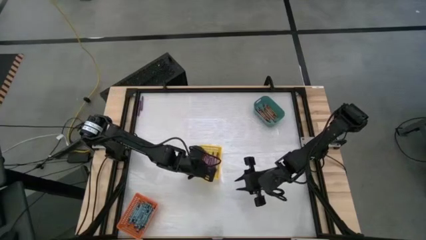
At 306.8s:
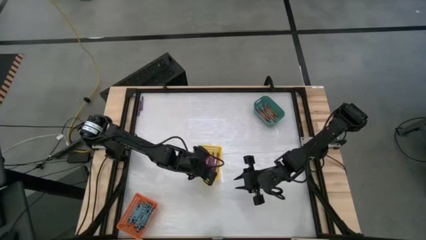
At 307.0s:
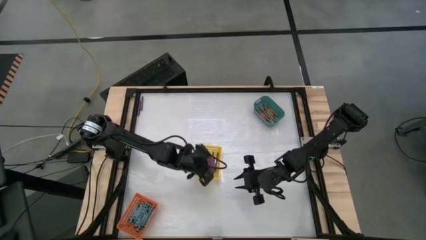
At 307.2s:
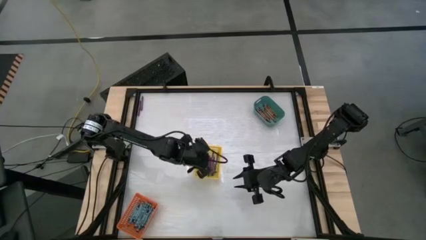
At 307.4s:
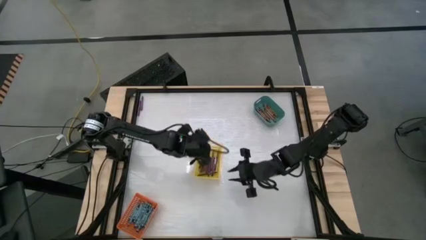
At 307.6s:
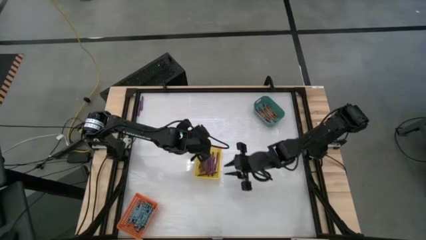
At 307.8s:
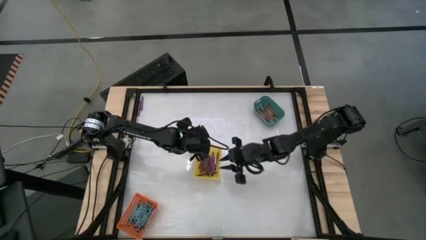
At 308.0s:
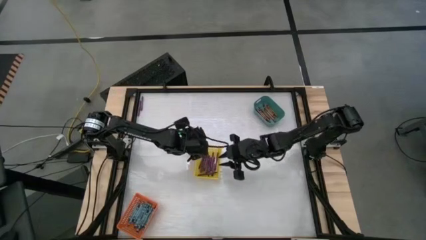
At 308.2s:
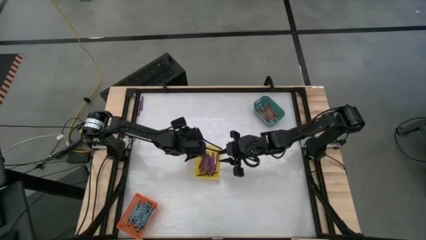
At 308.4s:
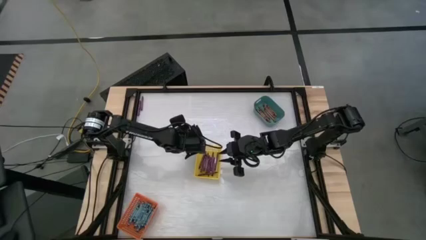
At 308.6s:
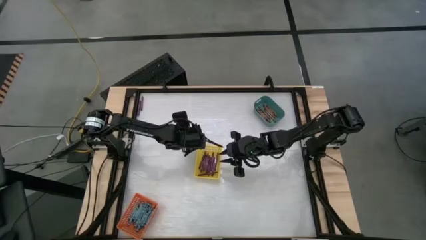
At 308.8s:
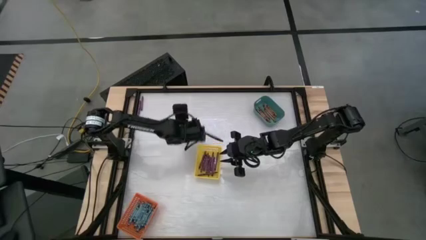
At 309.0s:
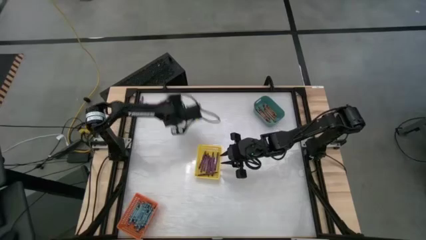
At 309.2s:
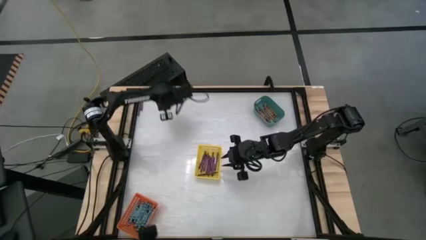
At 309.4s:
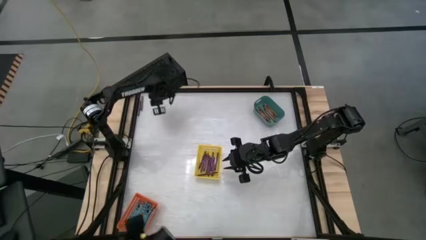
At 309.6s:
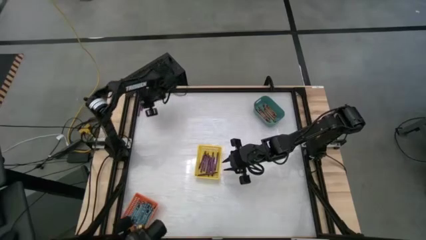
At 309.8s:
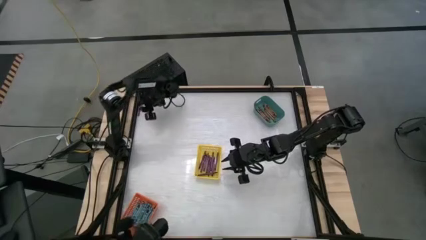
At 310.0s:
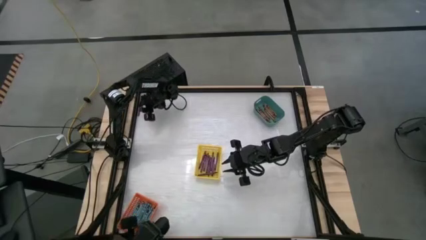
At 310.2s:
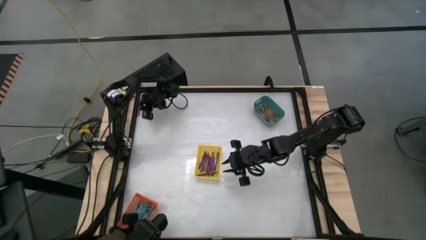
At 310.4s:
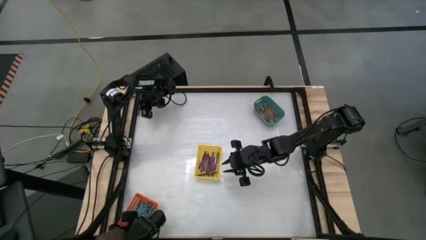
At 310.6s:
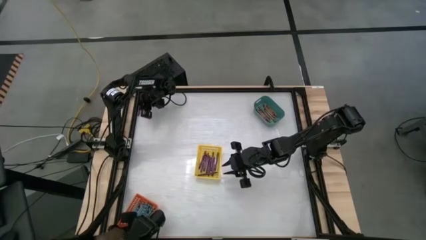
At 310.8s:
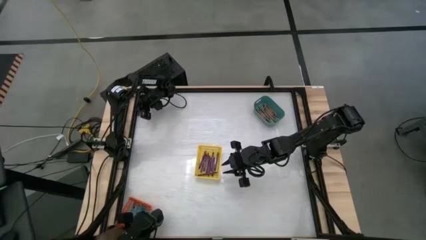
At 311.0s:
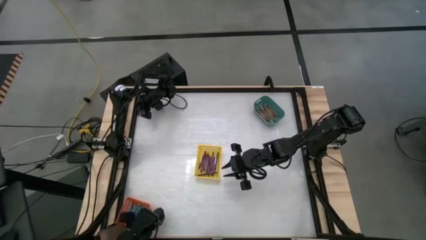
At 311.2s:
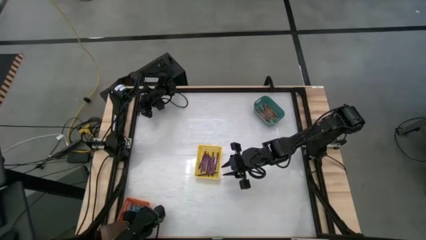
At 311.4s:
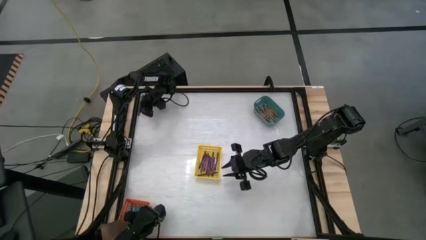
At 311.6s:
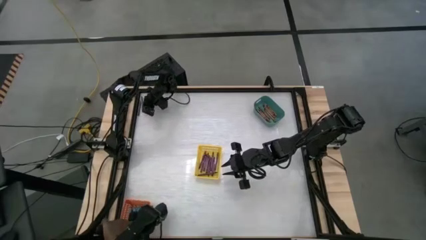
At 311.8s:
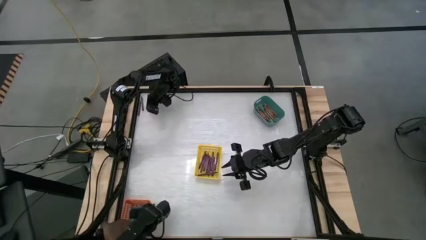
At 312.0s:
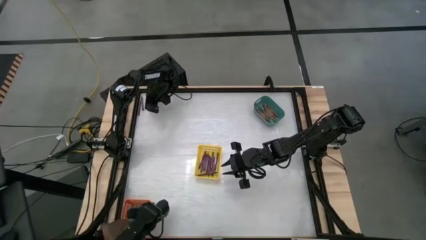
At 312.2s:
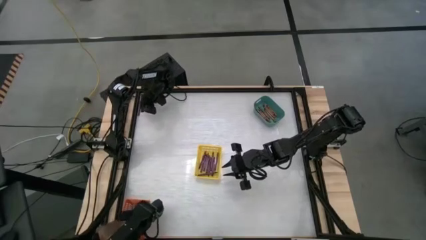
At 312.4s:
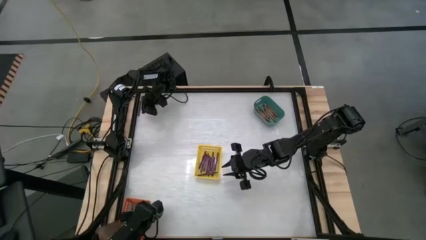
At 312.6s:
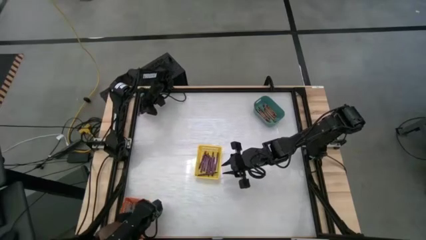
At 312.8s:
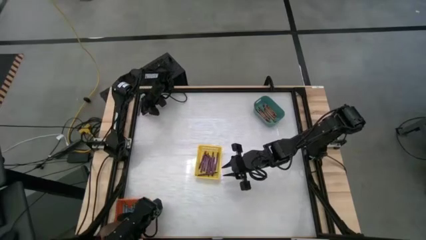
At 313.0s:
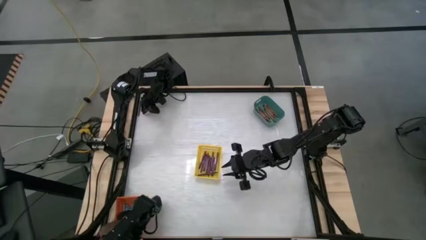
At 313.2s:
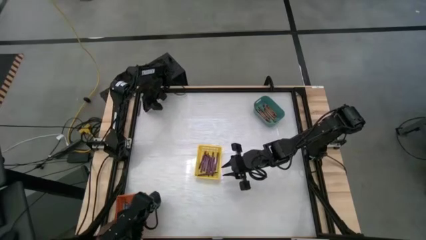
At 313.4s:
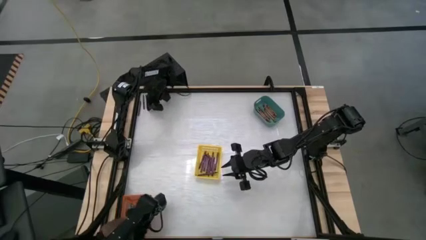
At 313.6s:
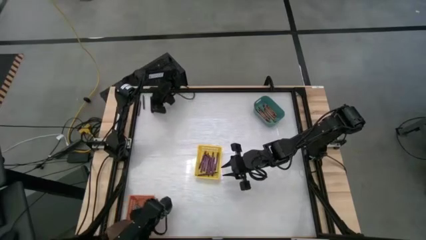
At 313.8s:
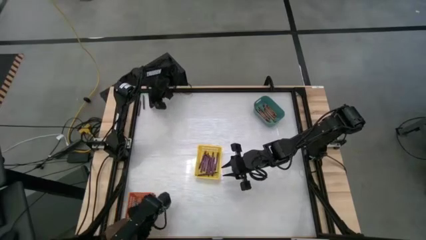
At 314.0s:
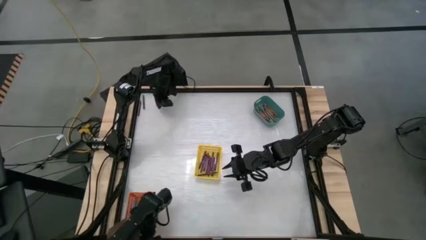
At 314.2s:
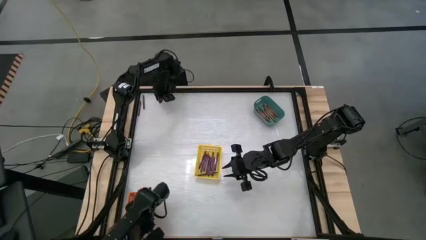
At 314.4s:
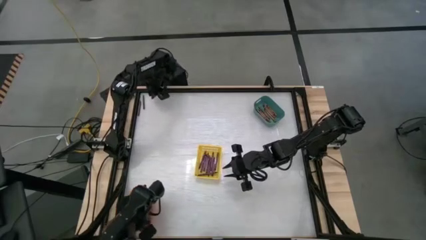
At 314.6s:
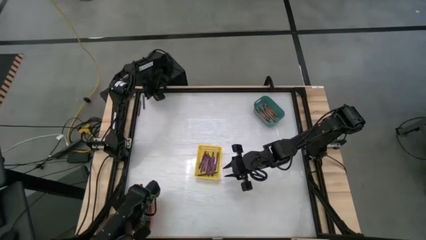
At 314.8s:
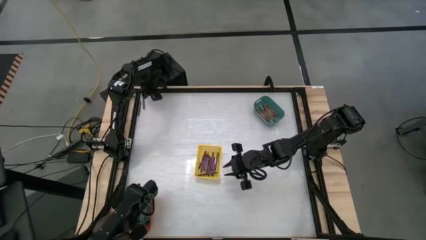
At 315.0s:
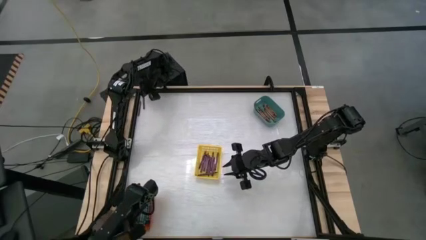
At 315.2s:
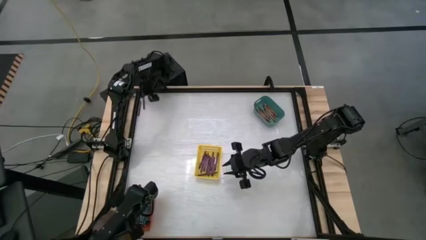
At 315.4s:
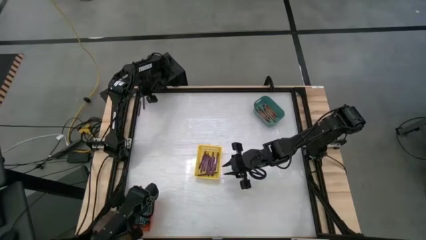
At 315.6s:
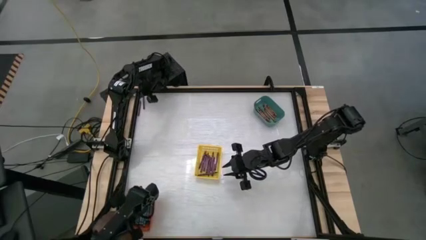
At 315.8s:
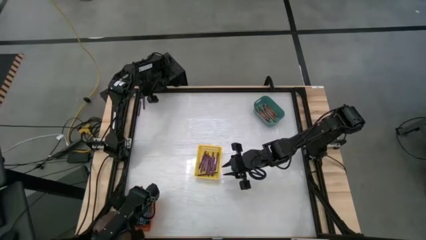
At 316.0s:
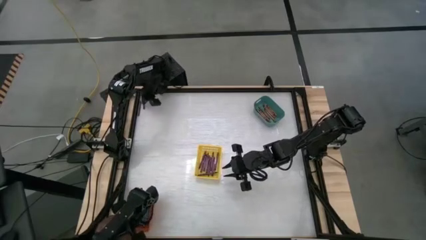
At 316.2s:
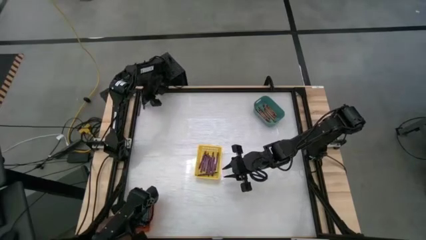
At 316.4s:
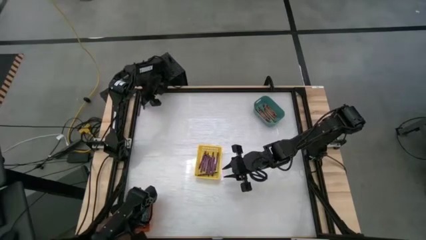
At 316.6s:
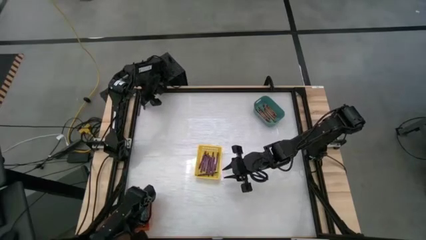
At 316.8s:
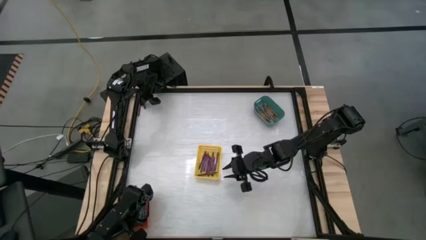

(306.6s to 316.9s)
Task: Sort crayons
Put the violet crayon into the yellow basket

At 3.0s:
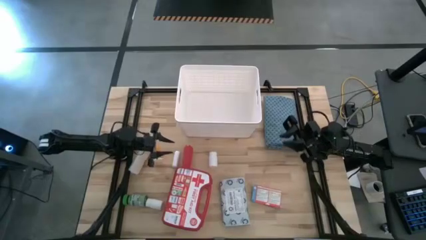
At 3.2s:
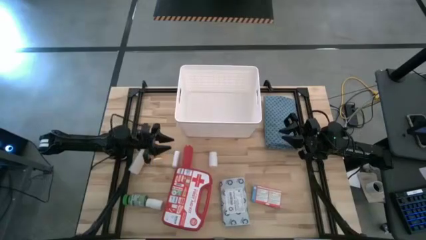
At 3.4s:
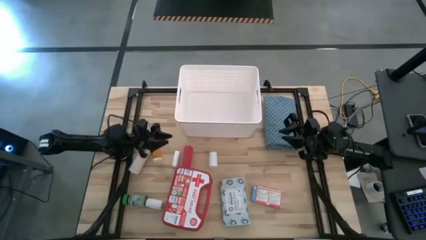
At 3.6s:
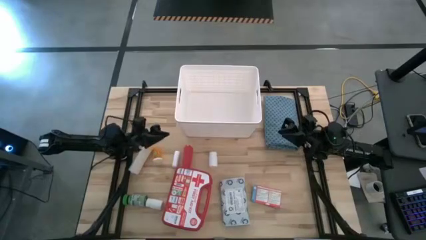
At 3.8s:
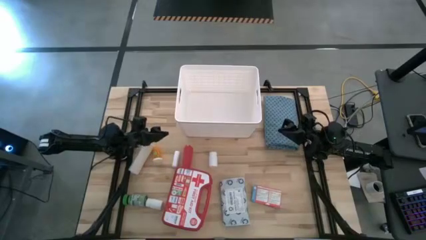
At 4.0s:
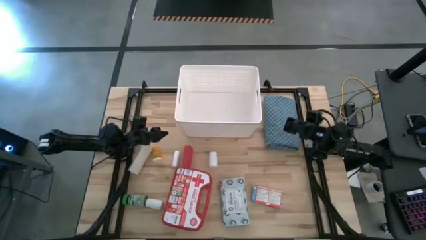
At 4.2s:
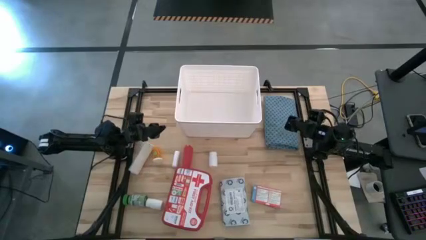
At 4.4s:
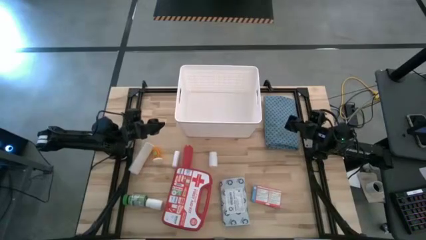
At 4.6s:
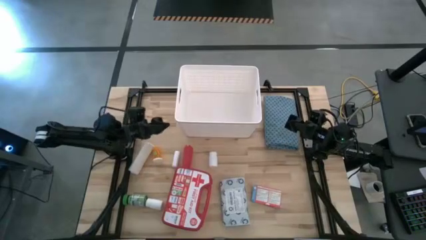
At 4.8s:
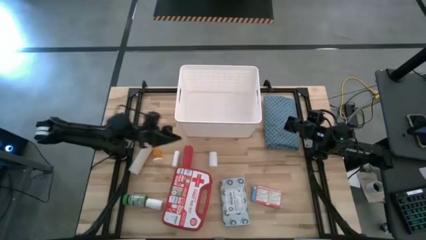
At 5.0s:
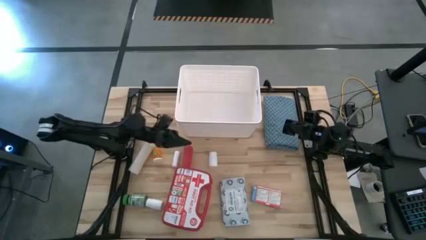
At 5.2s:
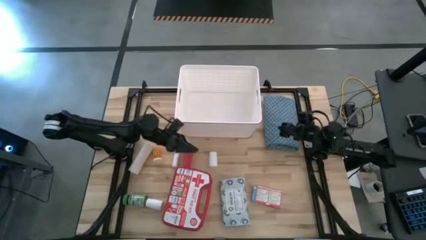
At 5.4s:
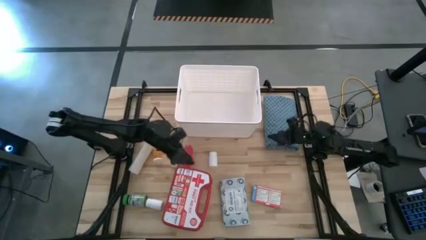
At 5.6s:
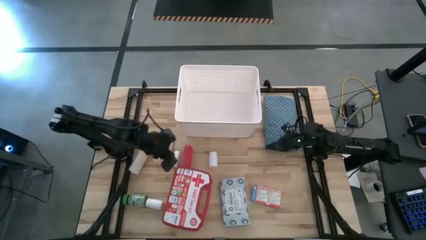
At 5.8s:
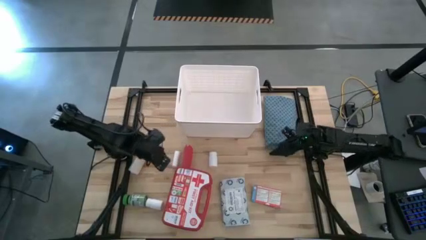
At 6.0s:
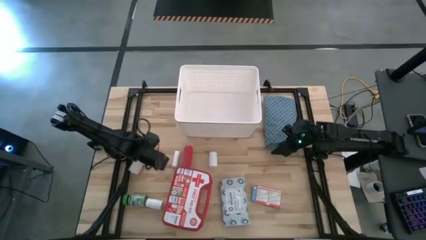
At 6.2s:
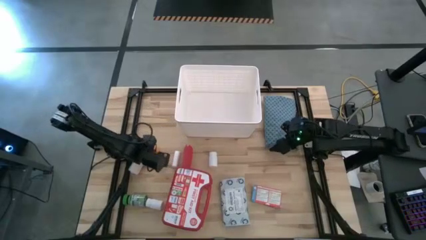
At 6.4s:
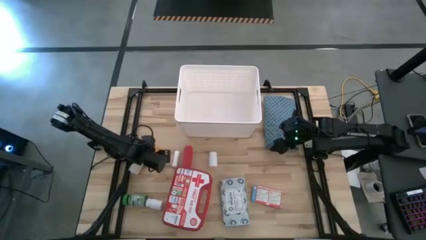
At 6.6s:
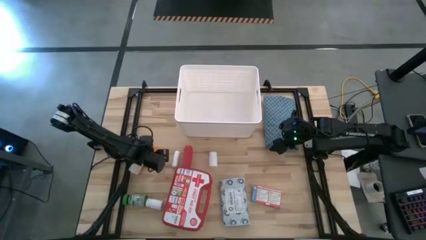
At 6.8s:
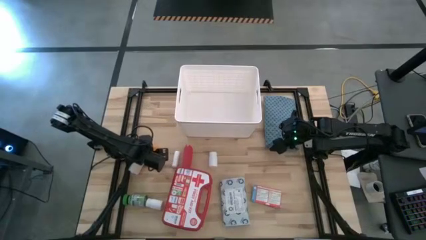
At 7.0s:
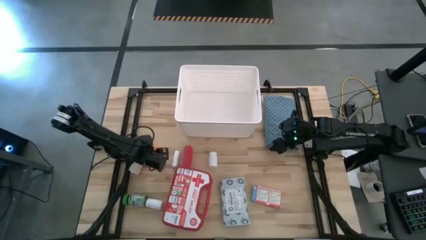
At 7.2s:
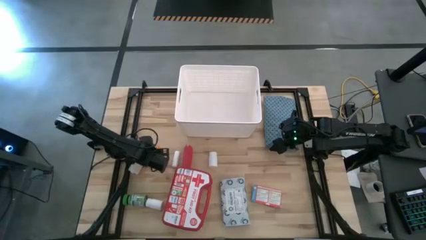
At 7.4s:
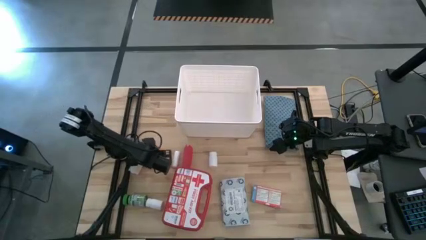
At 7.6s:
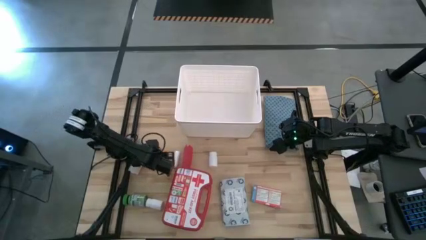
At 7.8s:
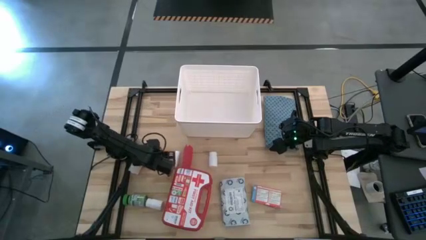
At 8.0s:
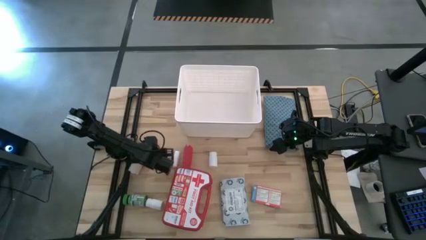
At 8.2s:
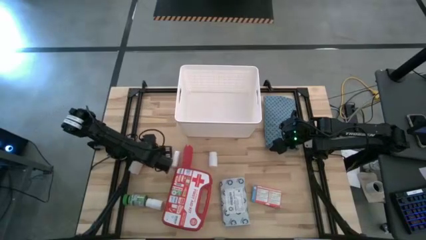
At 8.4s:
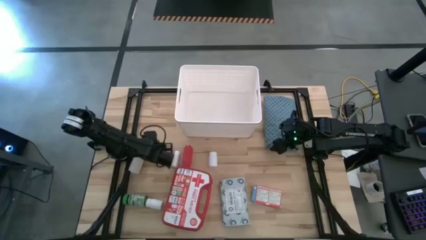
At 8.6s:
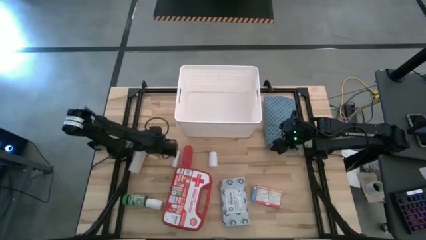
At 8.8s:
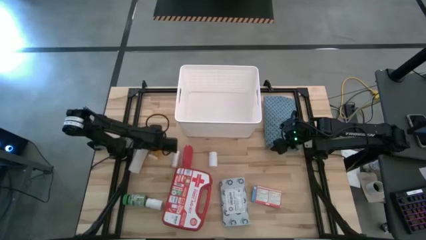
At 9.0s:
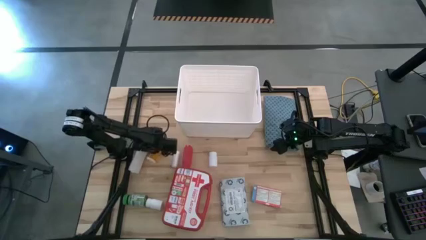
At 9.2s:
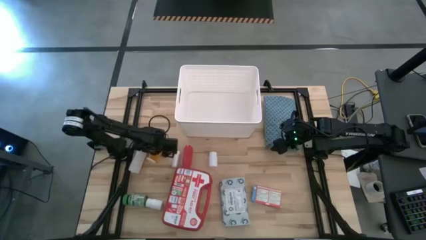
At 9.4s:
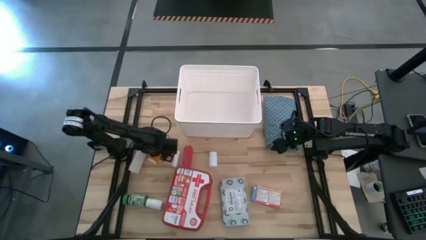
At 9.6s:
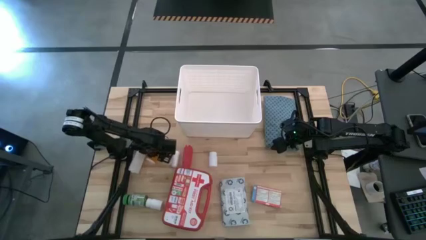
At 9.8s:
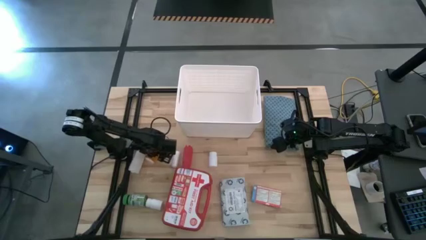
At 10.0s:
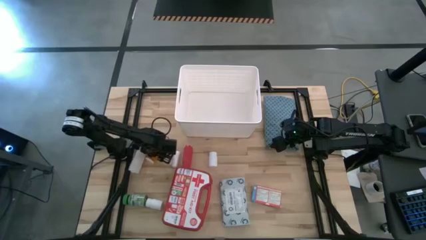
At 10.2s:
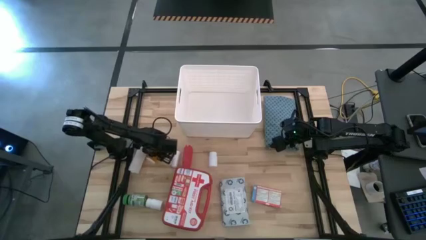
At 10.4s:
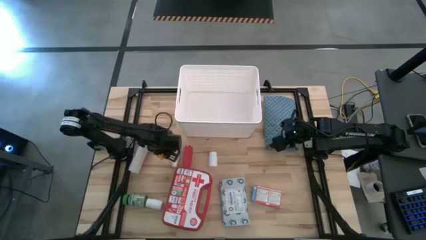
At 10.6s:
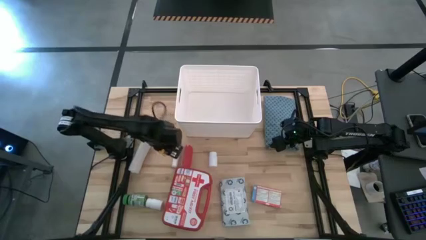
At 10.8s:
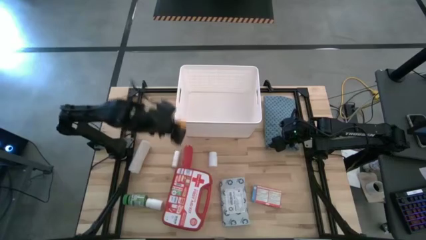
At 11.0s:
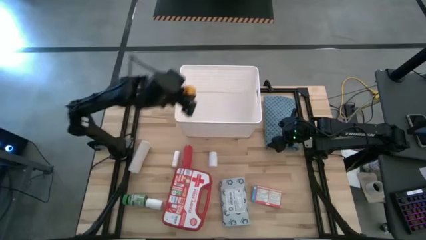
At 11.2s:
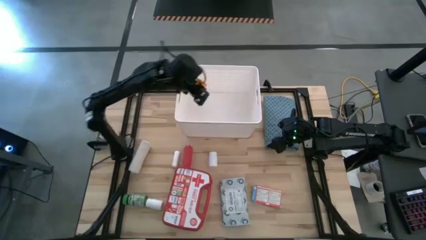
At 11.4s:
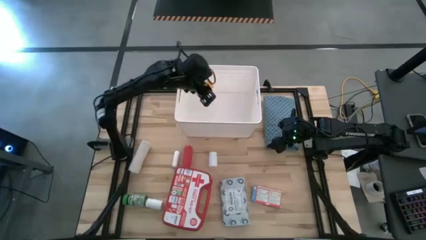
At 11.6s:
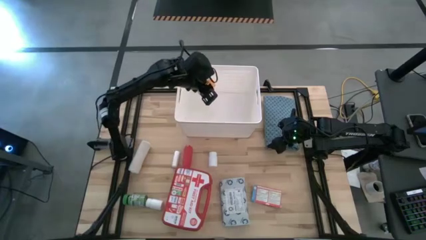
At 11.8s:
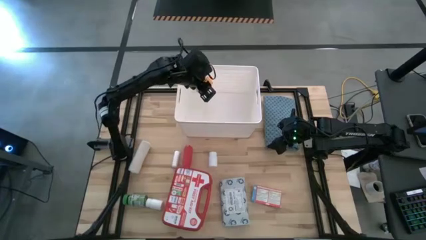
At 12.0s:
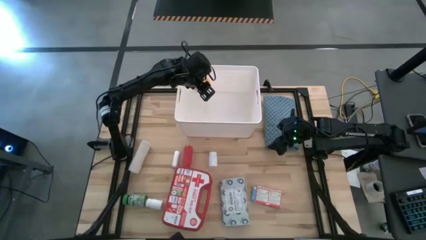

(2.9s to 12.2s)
Task: Pick & place medical supplies in basket/bin
Put the orange pill bottle into the white bin
